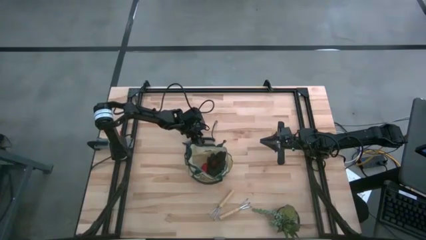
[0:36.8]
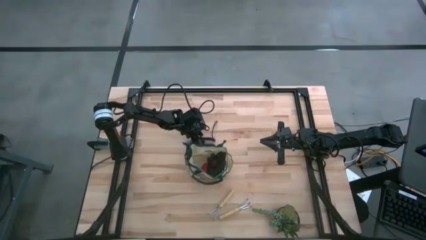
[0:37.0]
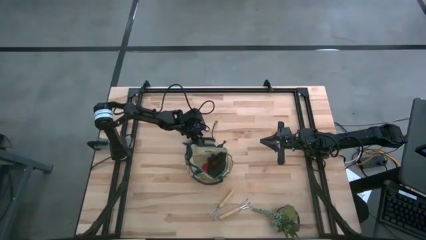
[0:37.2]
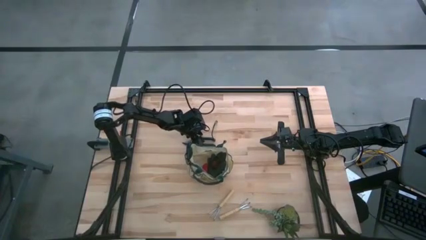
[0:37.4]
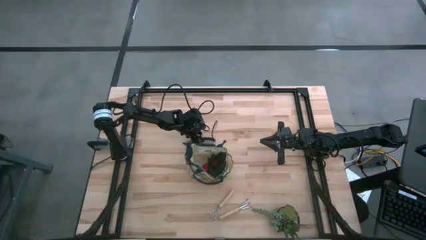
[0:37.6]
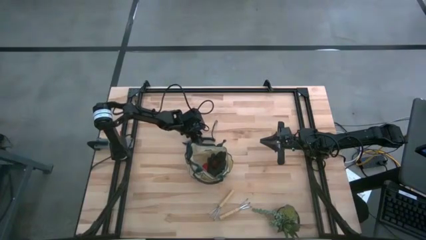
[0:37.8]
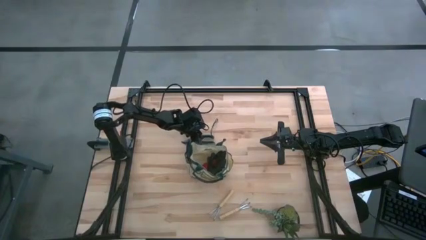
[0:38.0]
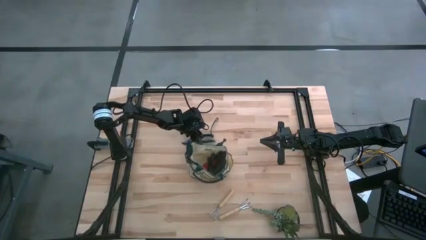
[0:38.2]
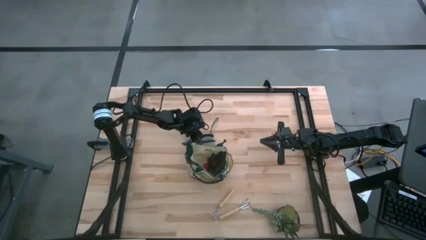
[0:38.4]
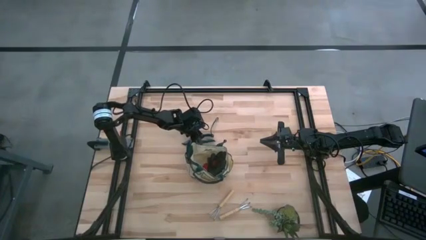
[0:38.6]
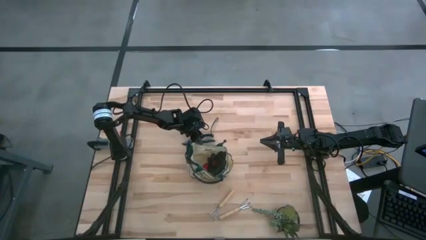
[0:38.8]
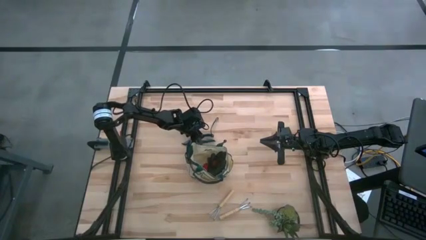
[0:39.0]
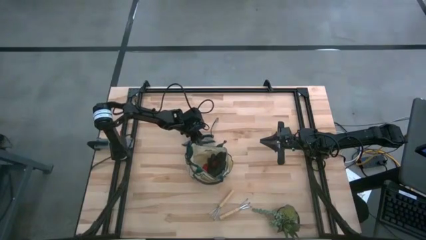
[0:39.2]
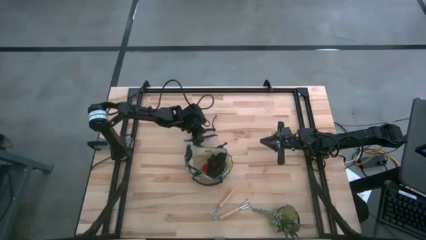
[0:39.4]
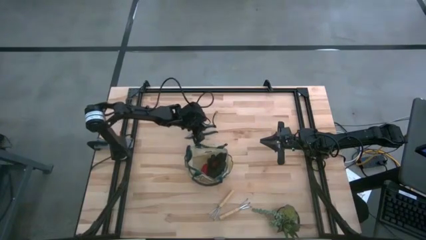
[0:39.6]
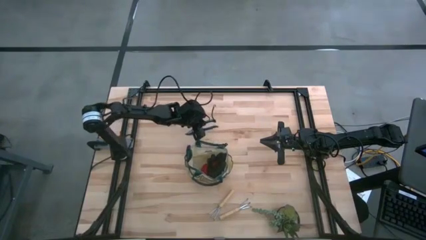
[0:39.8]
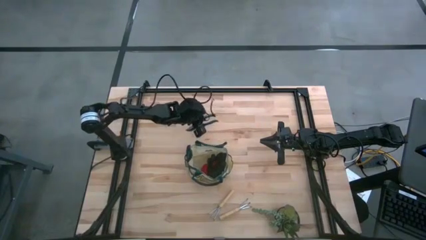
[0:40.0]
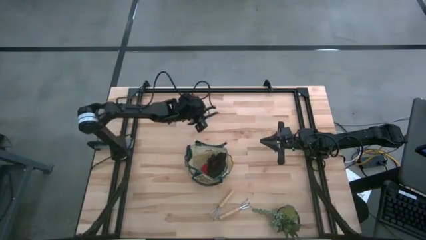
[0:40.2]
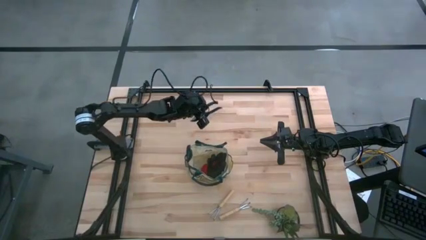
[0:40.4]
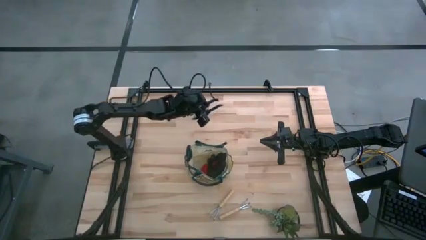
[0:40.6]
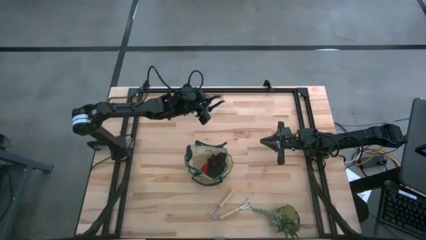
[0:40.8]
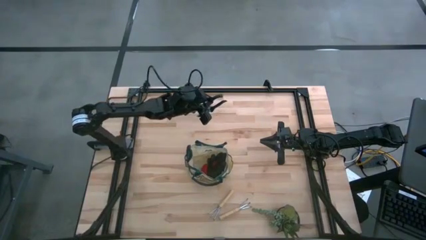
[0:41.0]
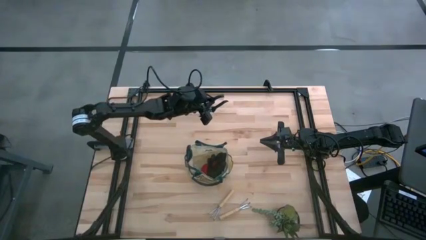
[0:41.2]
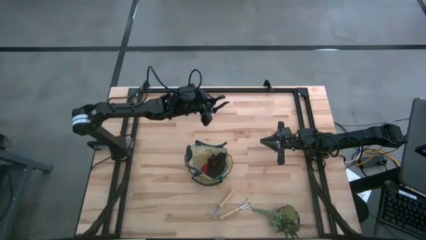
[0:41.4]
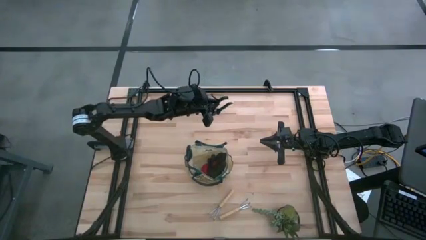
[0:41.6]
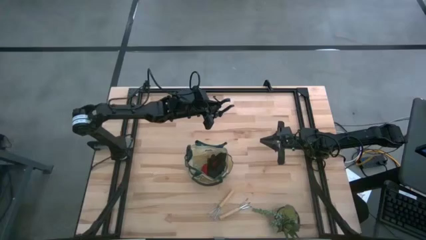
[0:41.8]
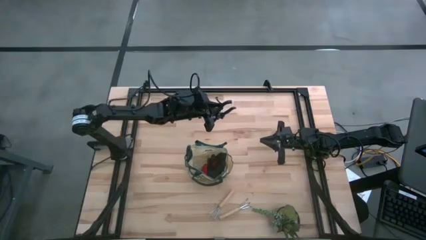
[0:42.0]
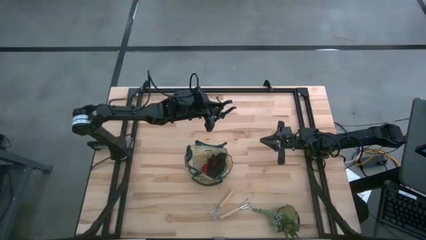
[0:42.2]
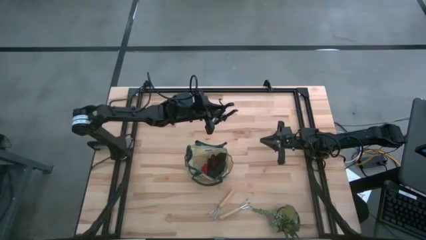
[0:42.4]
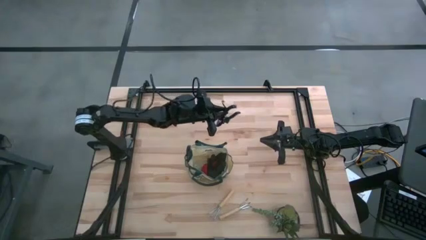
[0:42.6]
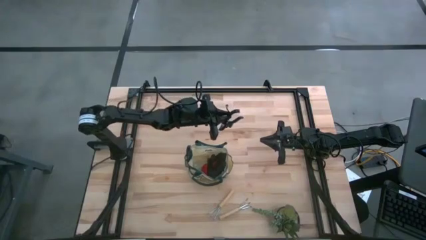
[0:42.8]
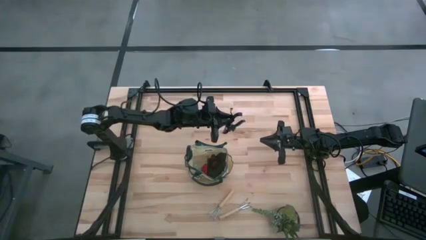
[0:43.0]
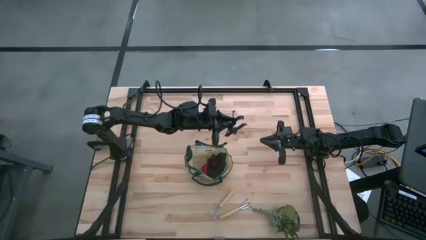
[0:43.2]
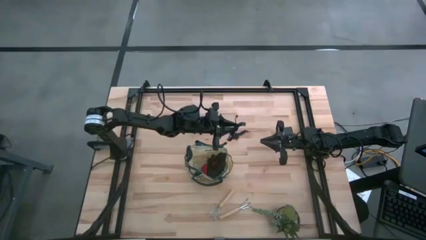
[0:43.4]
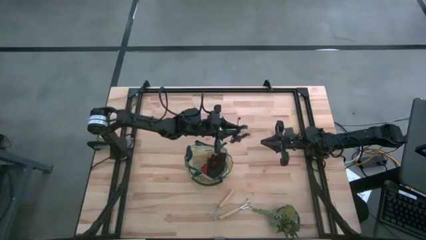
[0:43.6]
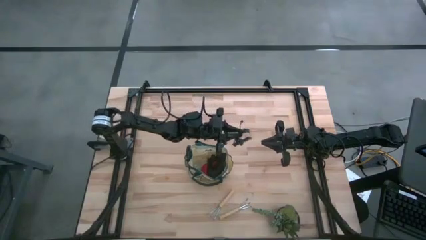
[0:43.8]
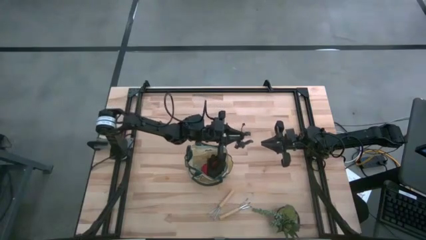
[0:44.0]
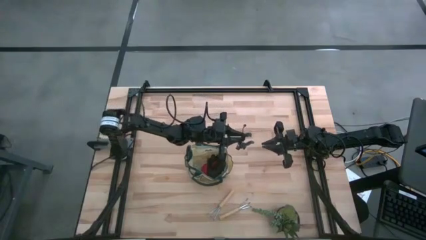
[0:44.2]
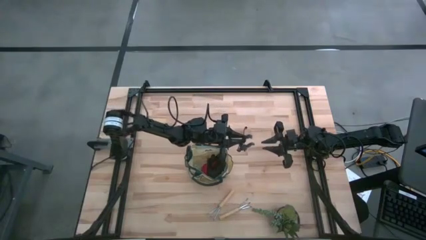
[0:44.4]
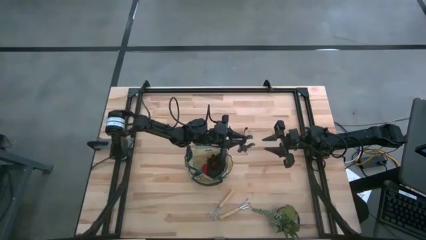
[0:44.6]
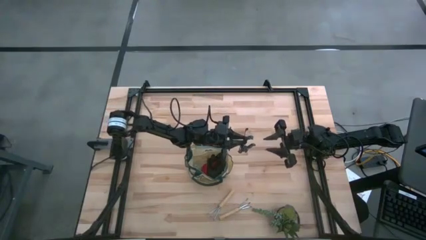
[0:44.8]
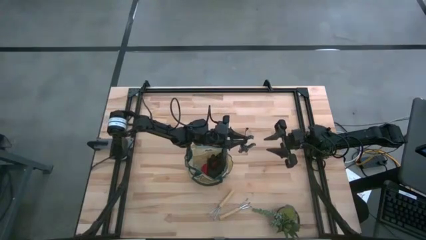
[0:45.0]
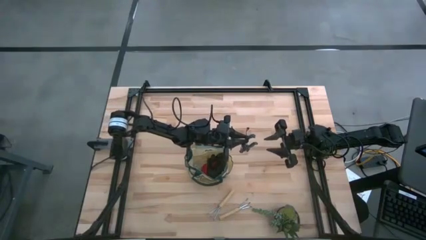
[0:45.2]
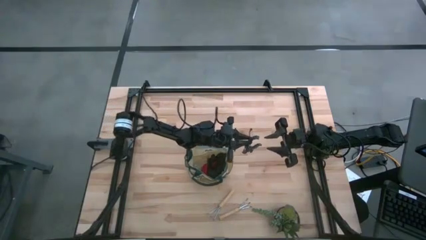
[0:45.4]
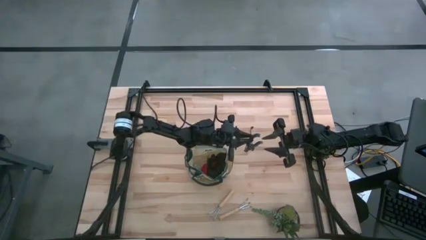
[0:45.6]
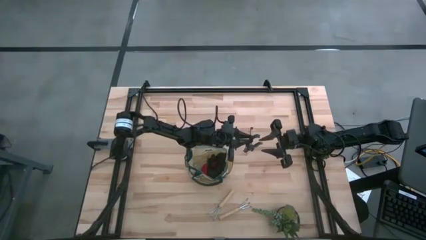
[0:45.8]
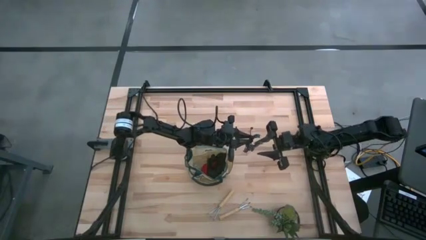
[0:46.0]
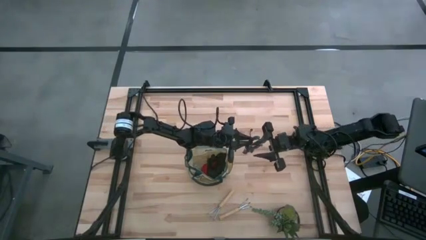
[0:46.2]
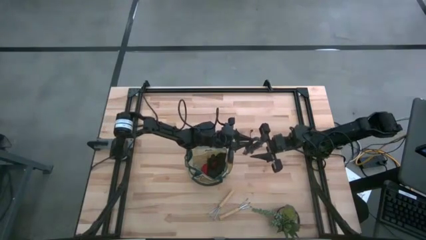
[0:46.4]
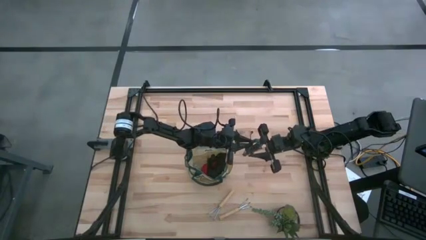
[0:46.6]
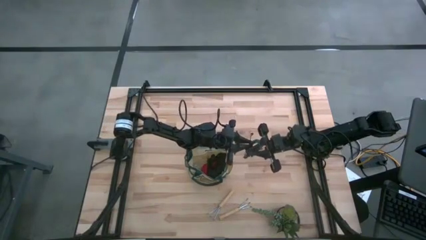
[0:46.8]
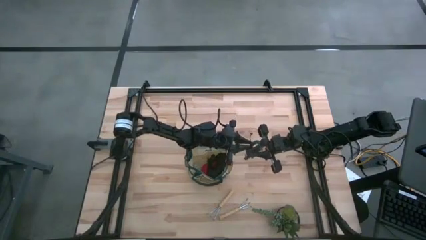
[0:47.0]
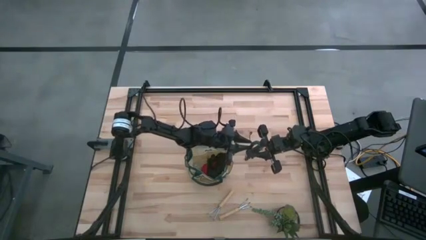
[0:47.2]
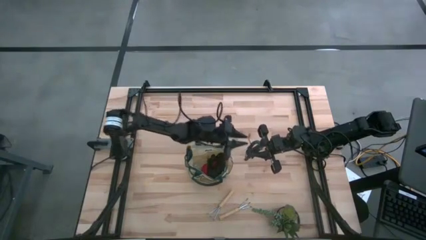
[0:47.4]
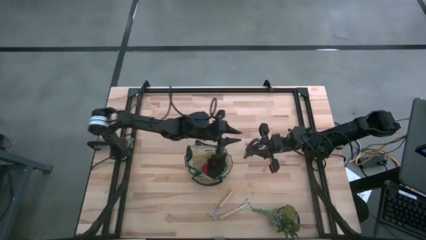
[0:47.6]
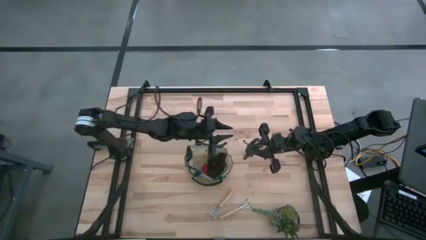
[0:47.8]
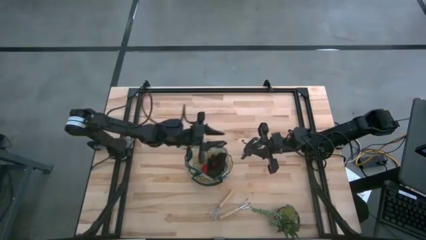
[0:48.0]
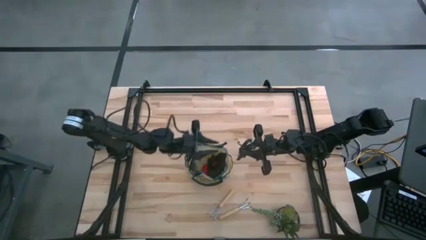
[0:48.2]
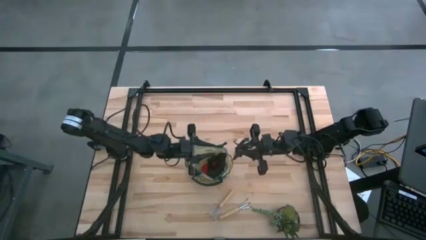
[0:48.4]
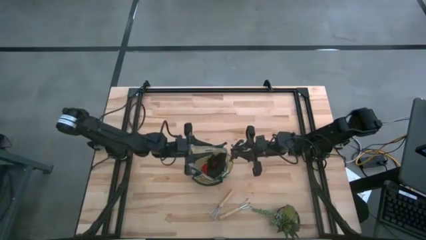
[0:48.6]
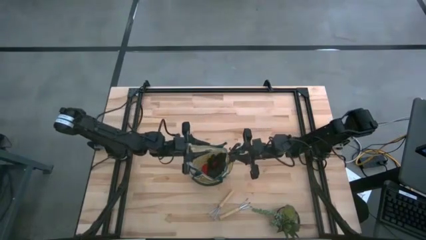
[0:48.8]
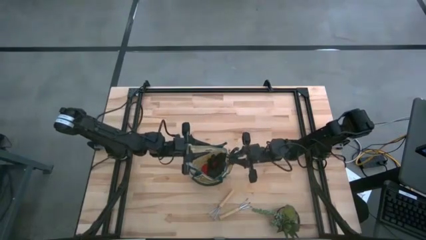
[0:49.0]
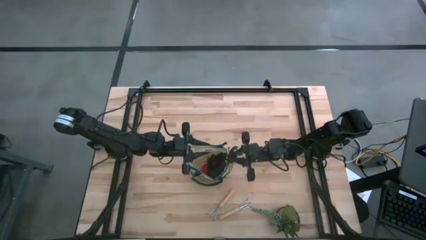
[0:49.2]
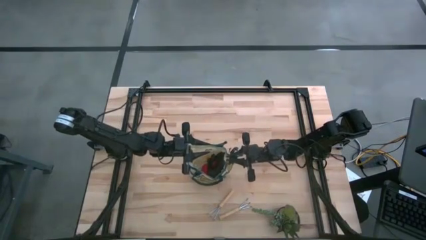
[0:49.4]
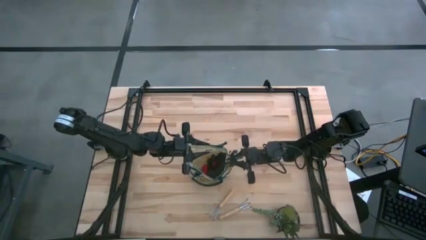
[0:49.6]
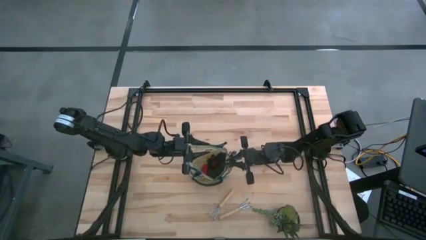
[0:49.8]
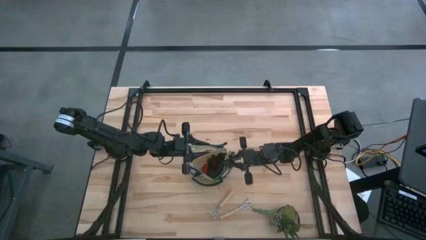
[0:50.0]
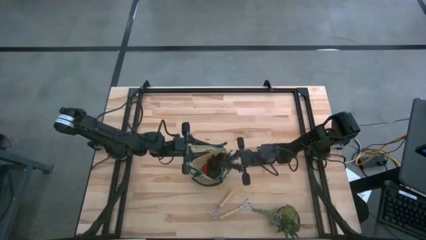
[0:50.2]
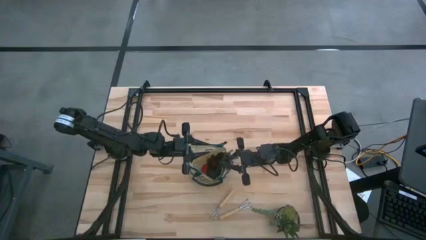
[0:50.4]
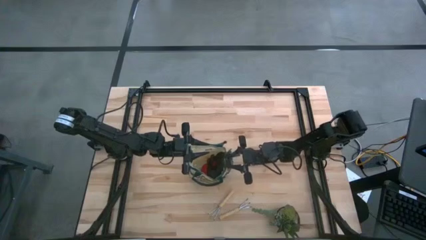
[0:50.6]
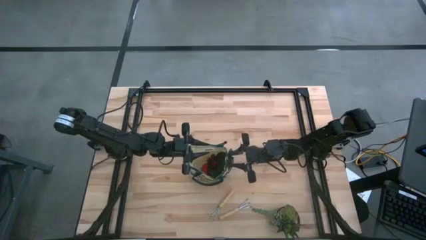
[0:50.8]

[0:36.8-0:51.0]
Task: Pick & Place Garden tools in Gardening bag
Put the green shear scissors into the gardening bag

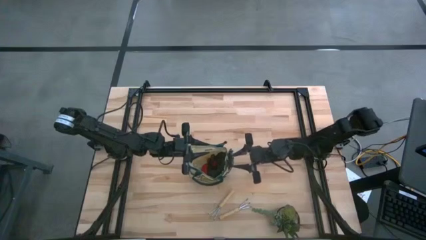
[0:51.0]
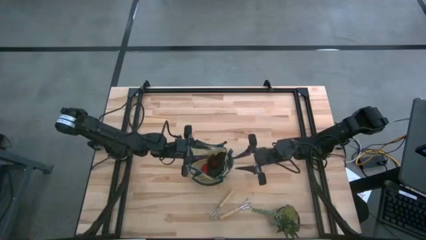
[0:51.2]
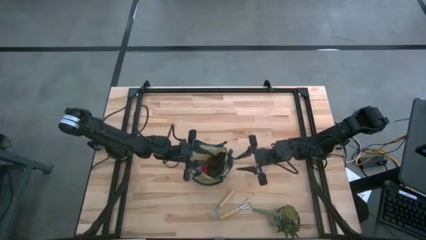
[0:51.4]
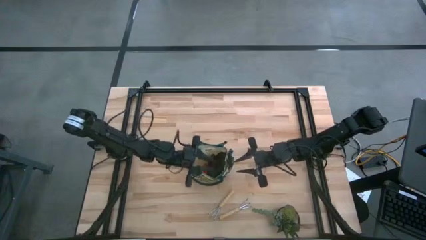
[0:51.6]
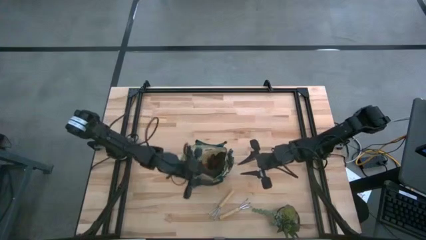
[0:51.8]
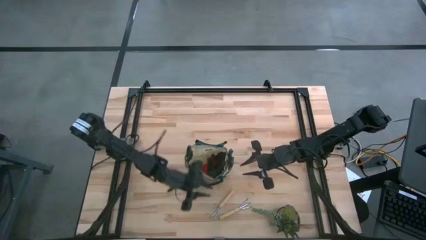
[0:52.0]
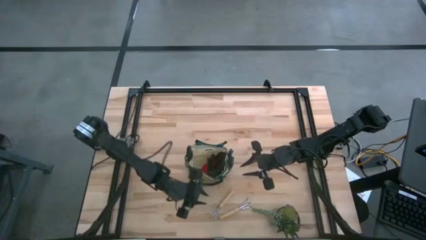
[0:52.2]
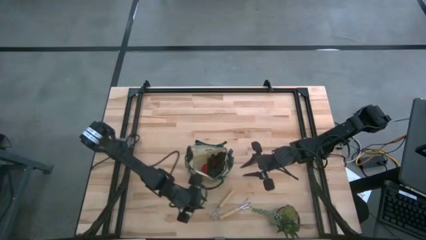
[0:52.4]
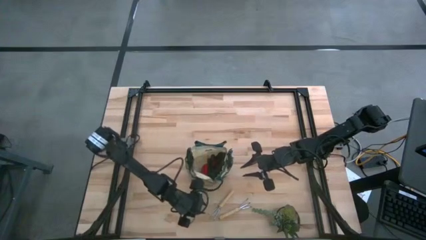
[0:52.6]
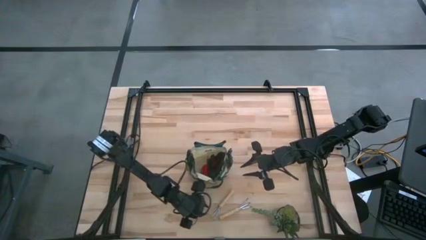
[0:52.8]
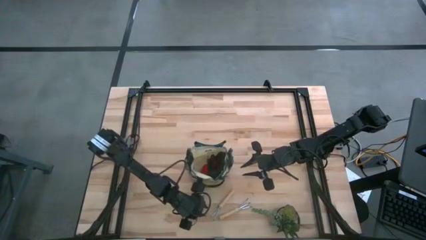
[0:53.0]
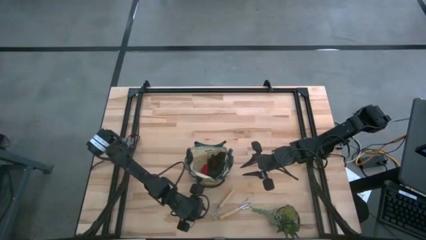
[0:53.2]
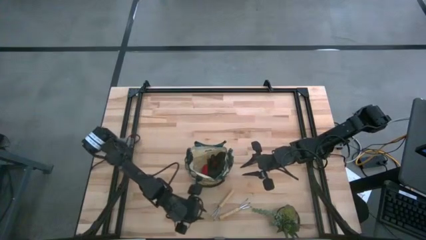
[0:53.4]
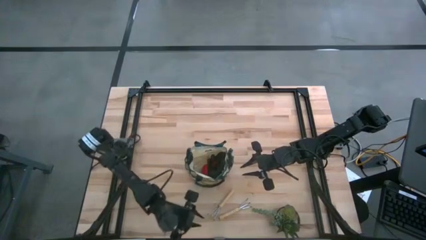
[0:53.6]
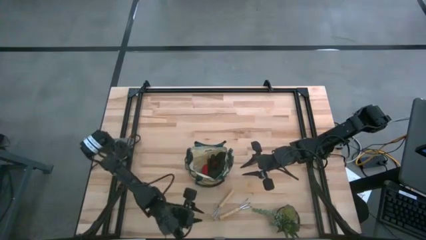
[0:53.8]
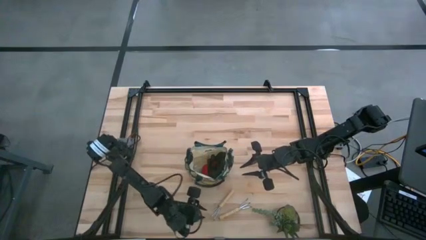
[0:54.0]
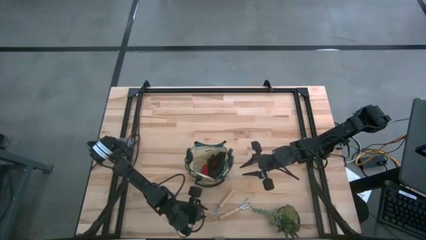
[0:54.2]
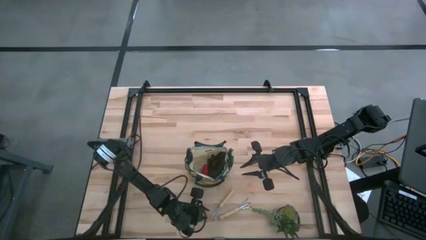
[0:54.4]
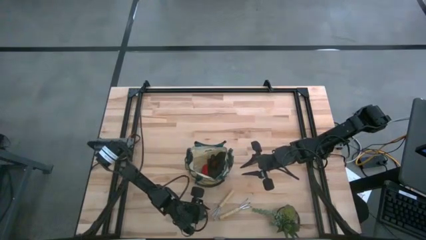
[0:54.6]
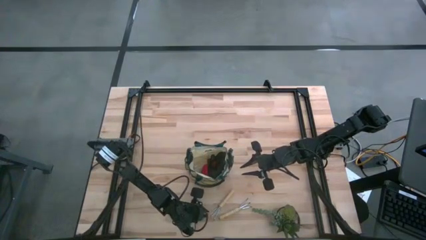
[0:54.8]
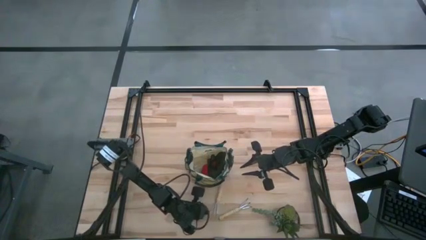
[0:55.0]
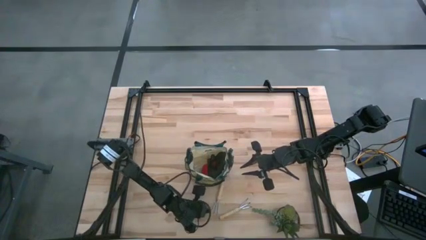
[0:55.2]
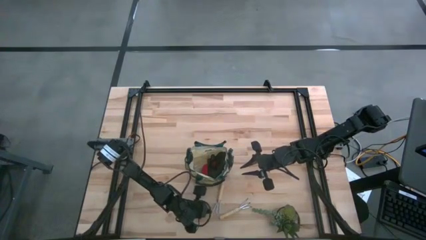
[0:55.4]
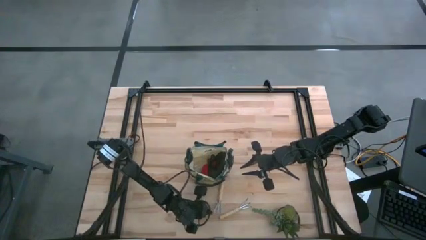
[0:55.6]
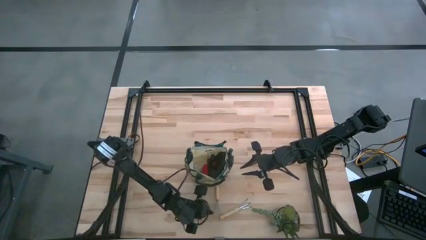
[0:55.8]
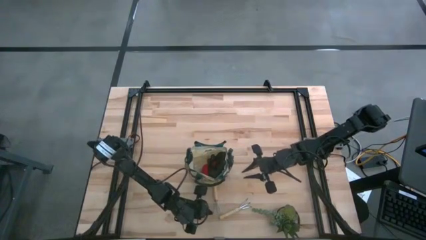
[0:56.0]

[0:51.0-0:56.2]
Put the brown hand rake into the gardening bag
